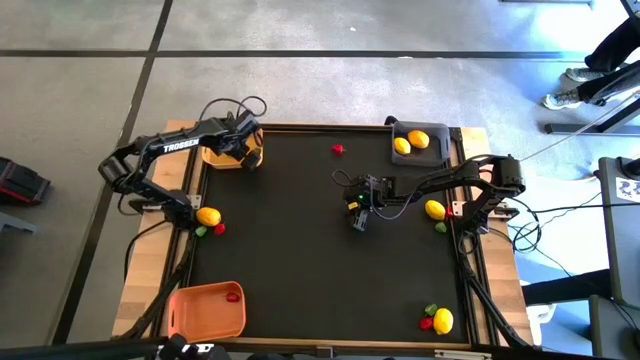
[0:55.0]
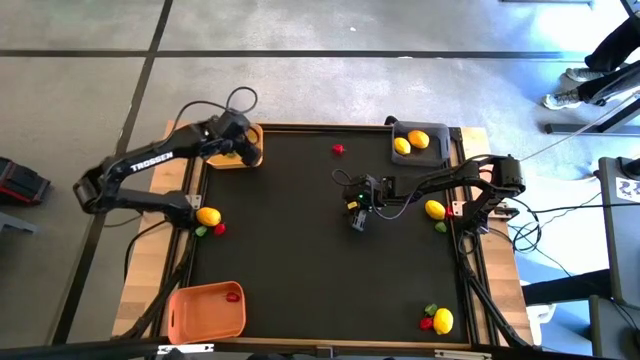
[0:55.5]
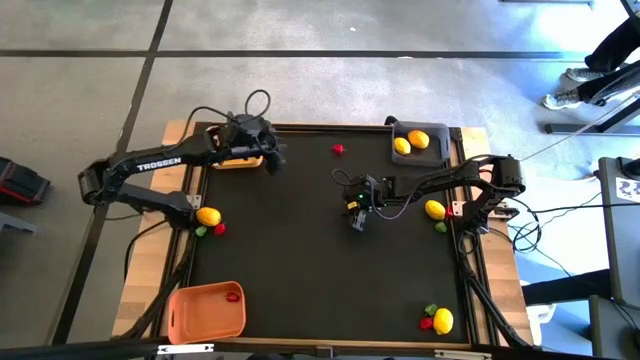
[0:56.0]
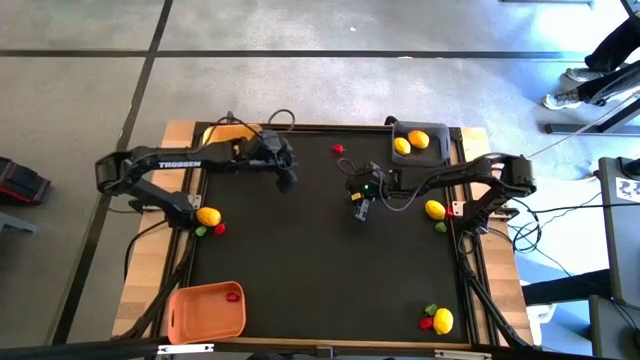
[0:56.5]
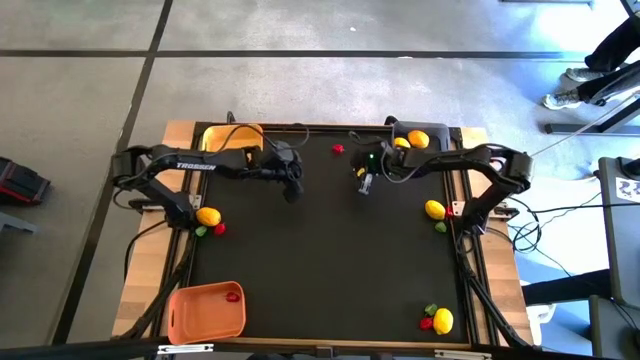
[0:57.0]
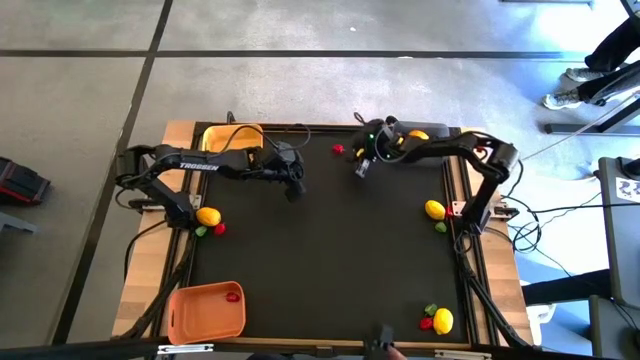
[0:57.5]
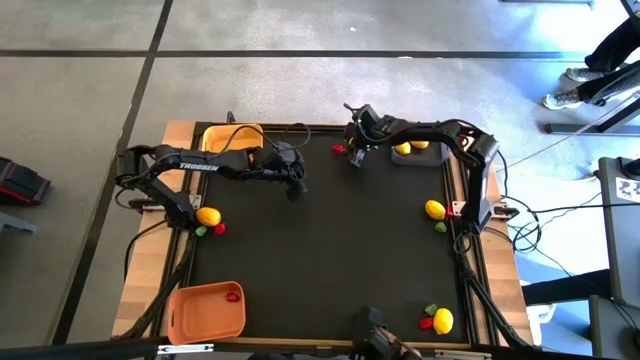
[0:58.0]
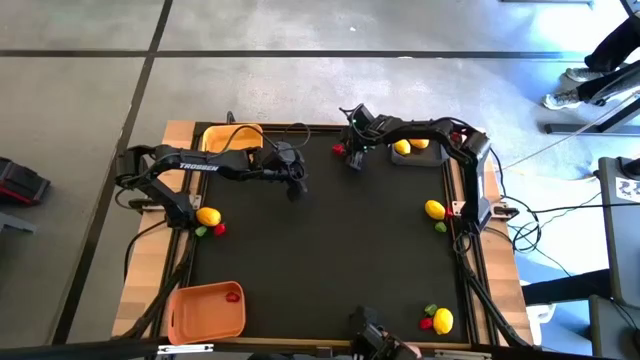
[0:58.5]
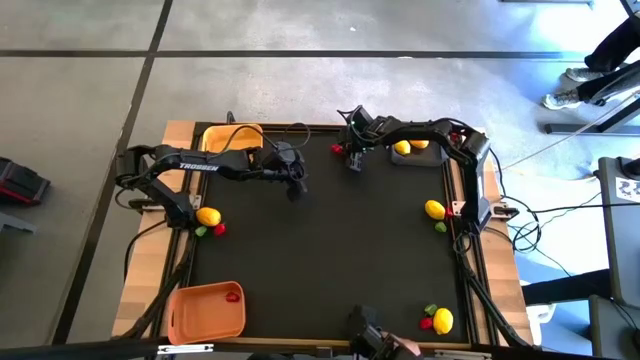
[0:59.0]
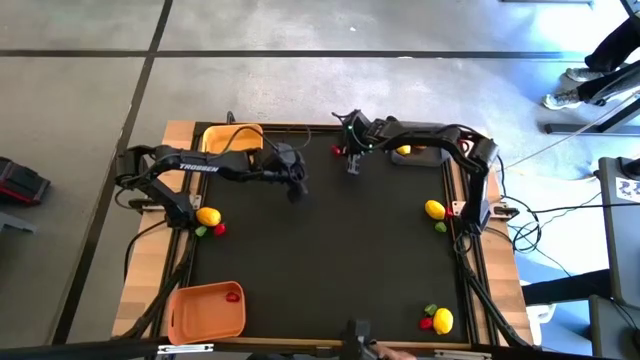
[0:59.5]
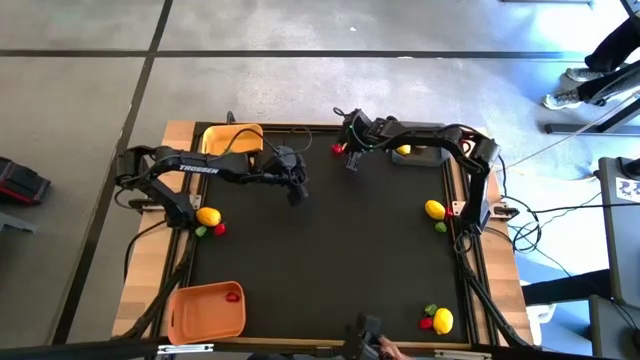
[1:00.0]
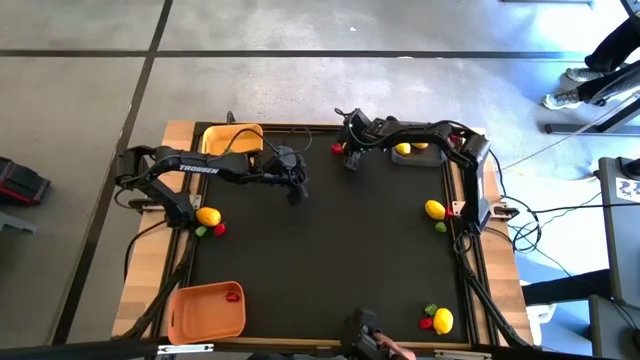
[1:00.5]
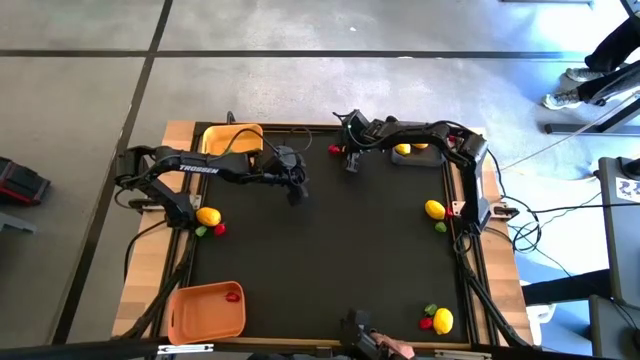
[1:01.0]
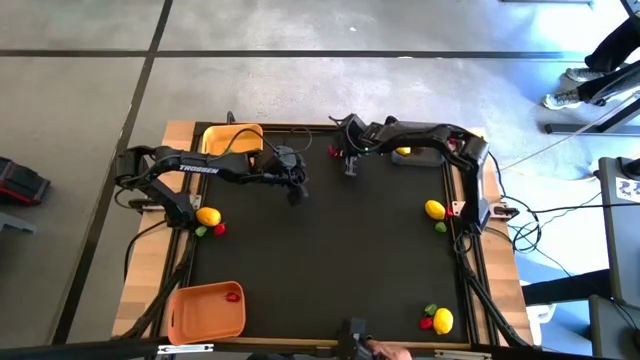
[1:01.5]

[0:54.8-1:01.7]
Task: Sort produce into baskets
Put the red bell pepper into the orange bin

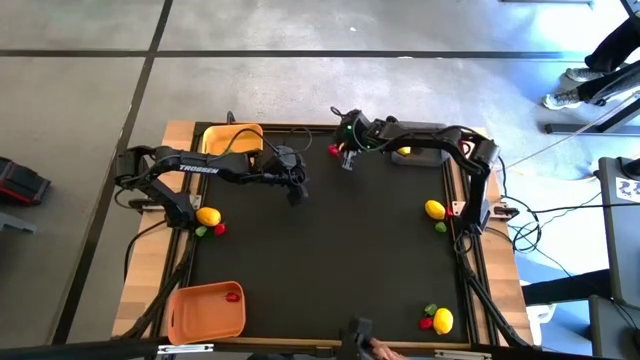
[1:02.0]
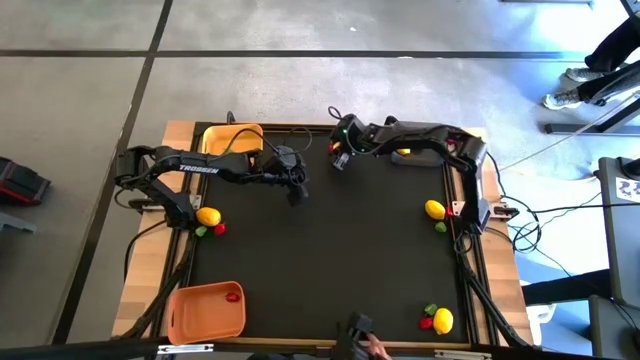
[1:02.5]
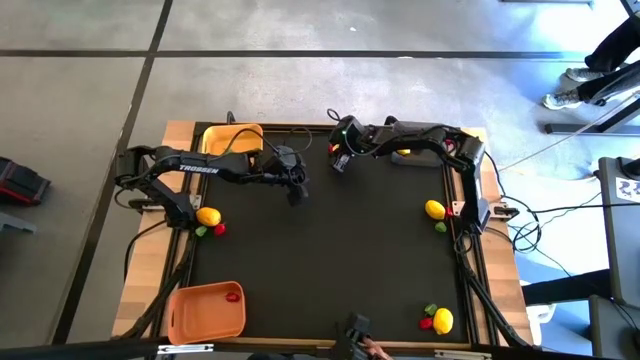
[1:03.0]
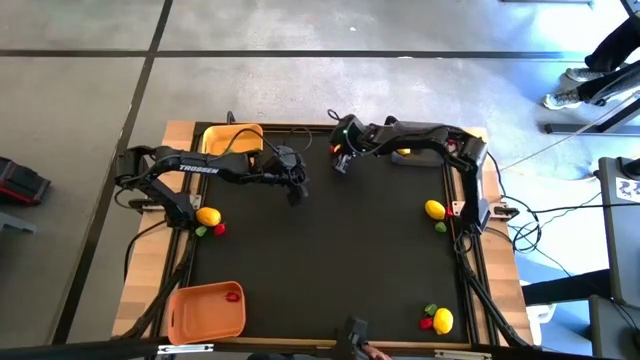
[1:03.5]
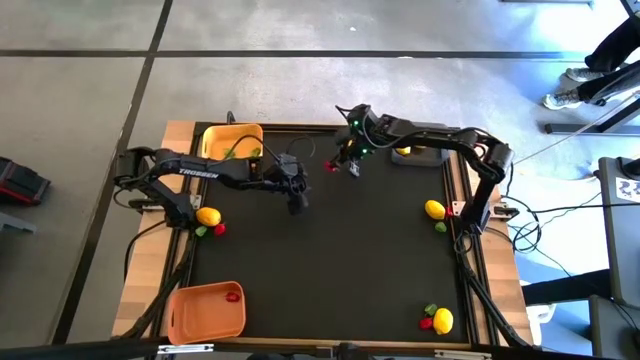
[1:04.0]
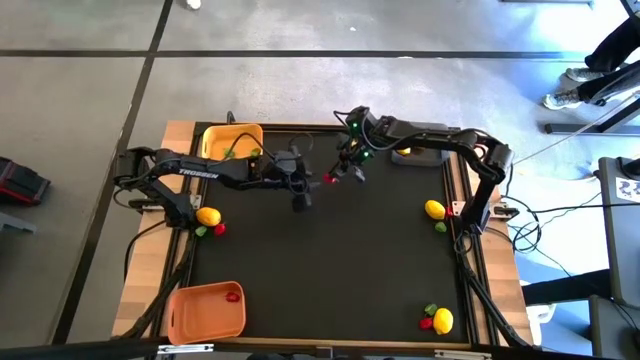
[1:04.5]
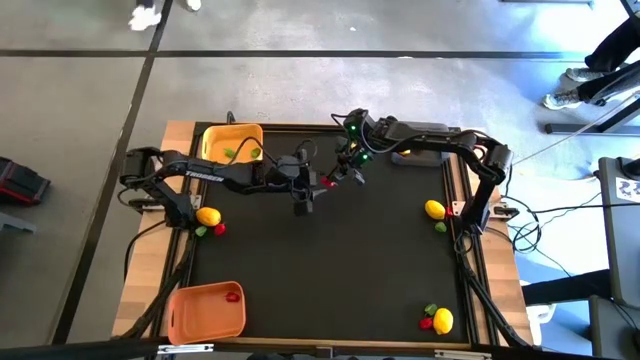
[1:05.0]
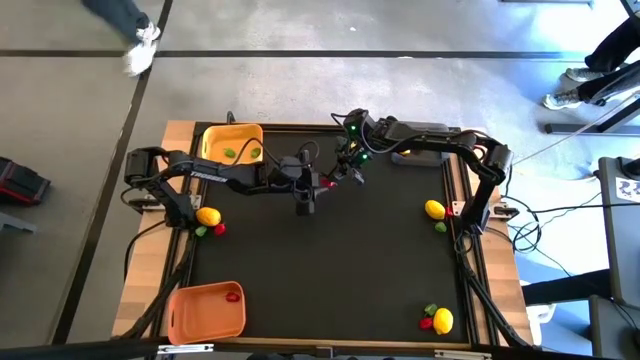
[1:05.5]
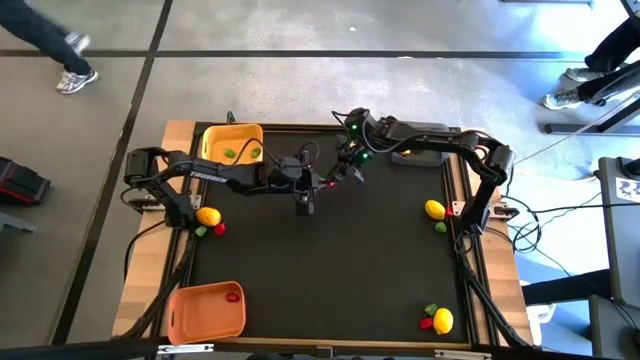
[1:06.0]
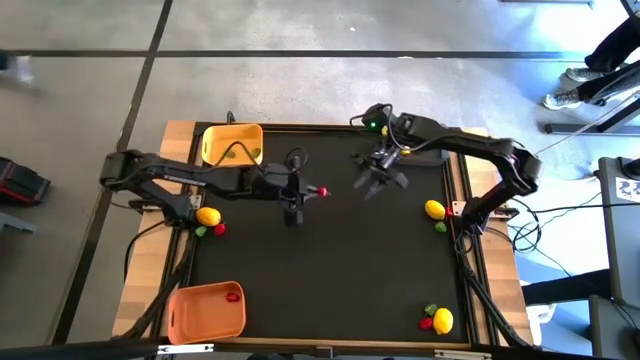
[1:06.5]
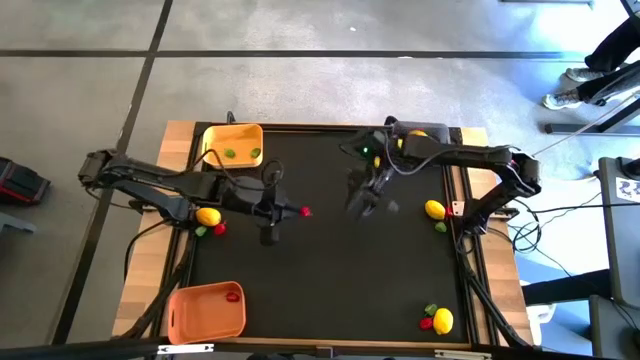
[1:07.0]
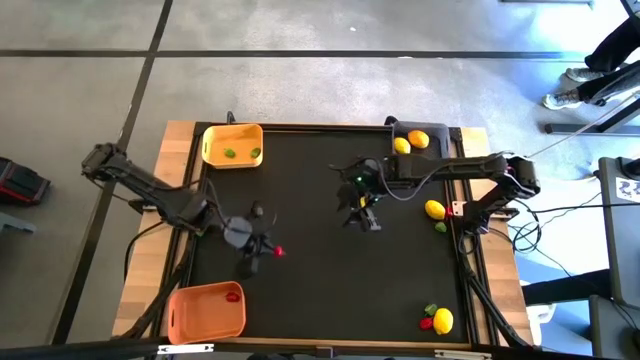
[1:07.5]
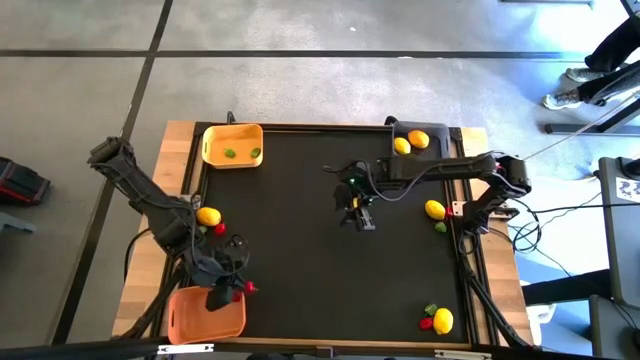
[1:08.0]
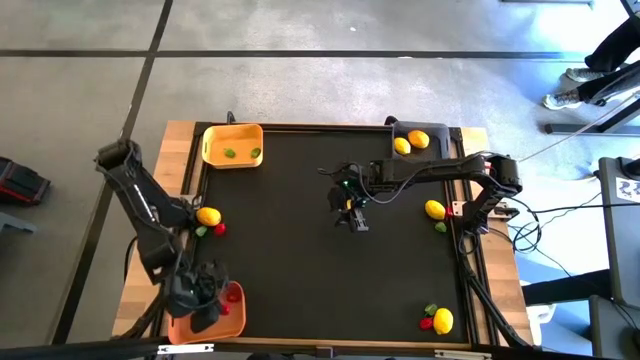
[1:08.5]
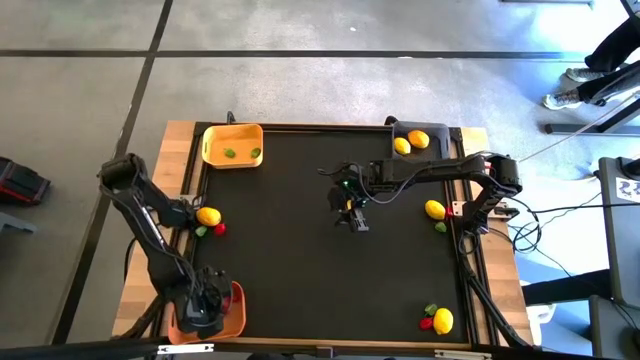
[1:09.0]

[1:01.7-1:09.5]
Put the red bell pepper into the orange bin

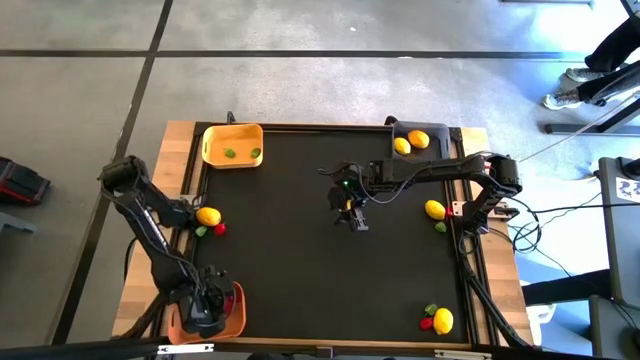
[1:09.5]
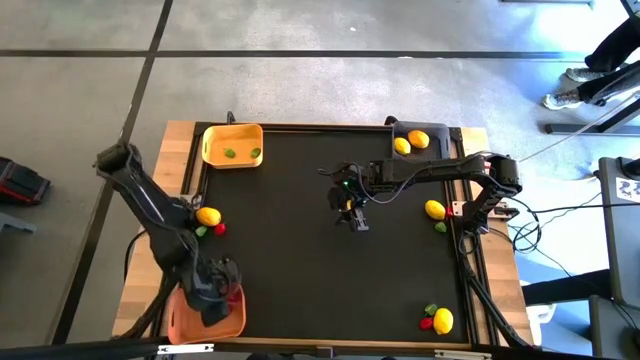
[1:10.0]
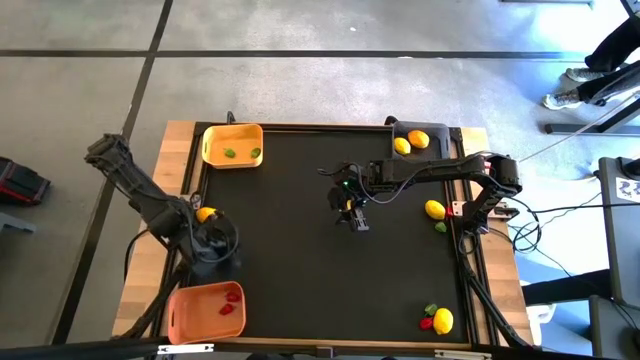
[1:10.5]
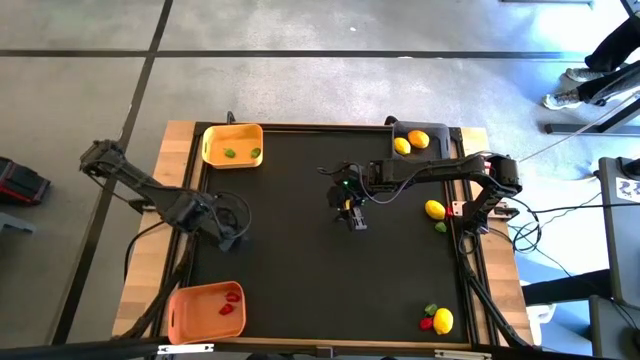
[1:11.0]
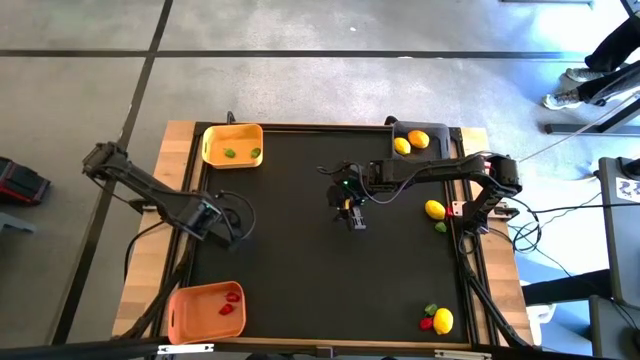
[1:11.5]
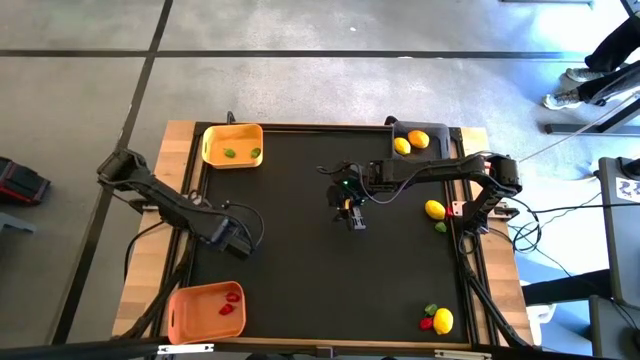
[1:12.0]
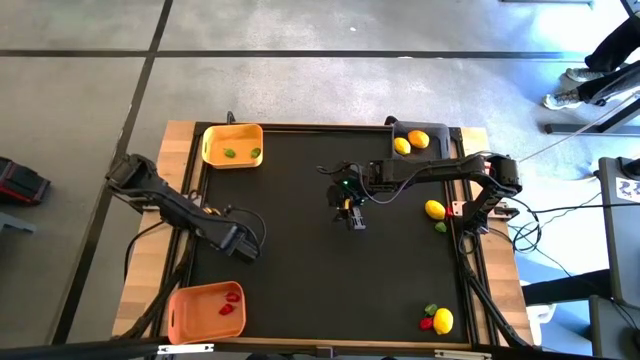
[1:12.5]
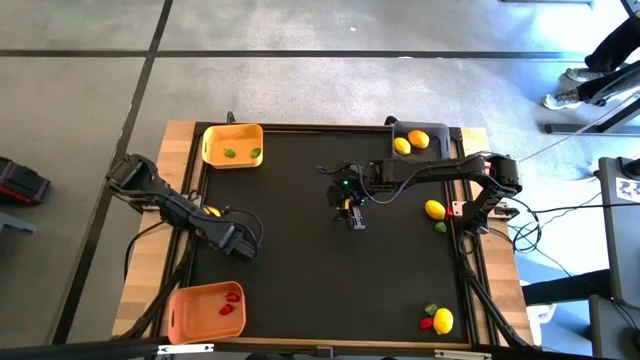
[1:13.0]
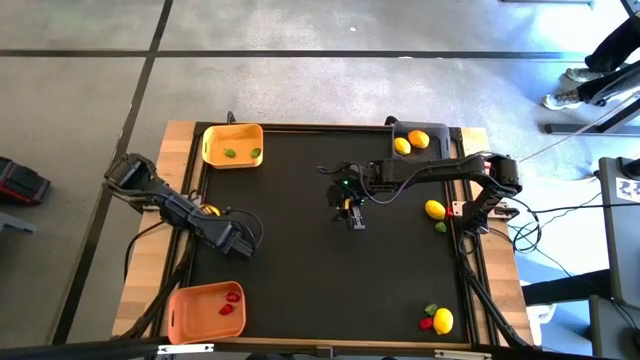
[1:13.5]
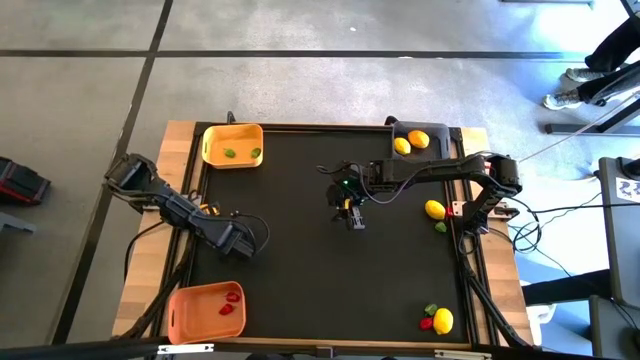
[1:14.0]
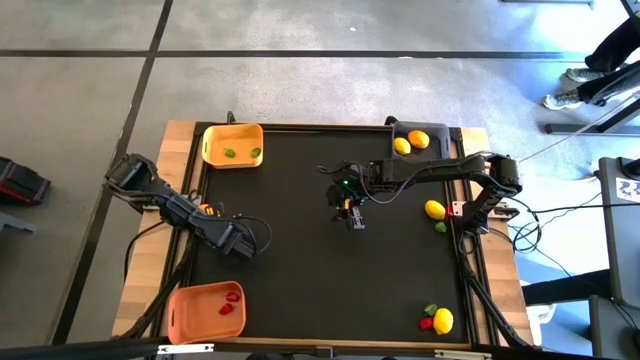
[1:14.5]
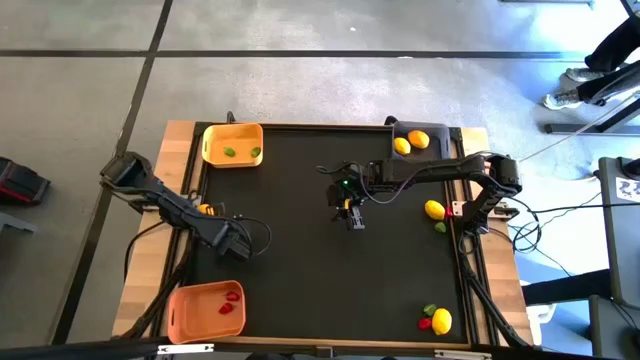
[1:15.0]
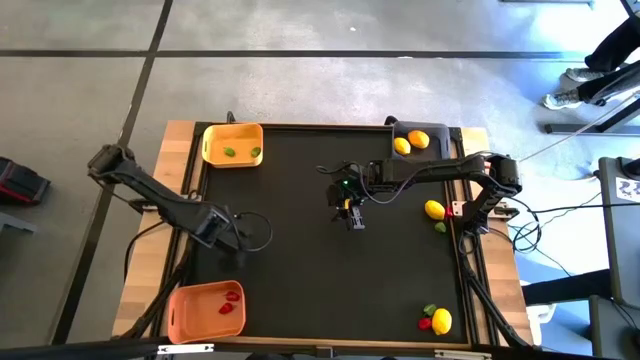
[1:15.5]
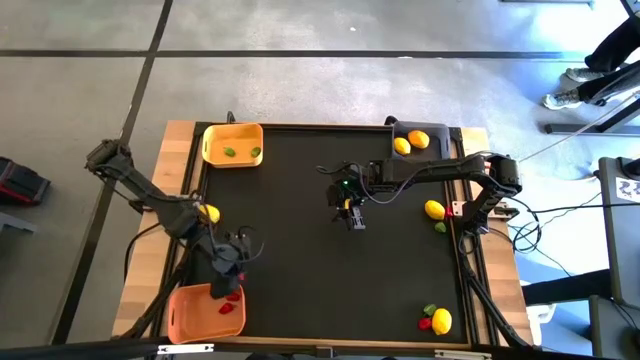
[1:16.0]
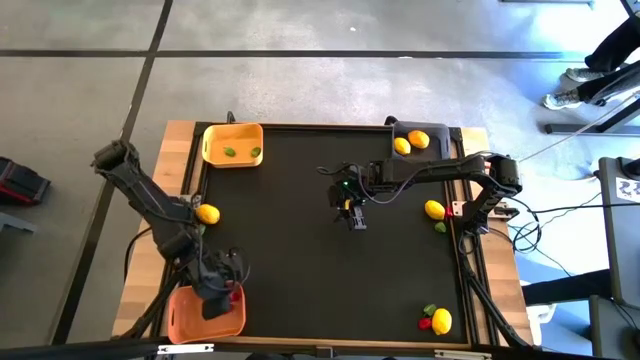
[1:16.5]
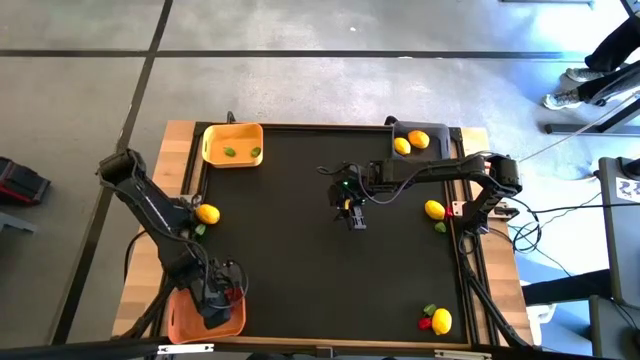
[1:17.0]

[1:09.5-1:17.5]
Put the red bell pepper into the orange bin
